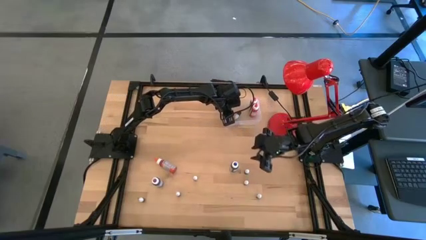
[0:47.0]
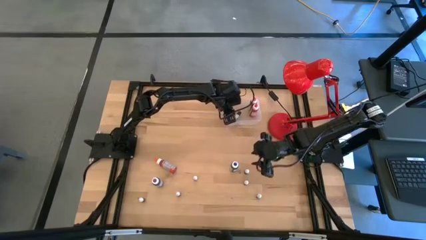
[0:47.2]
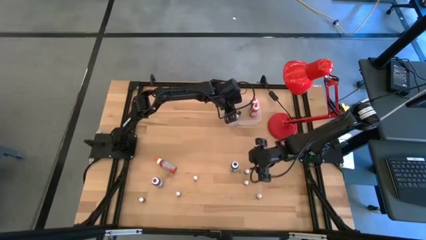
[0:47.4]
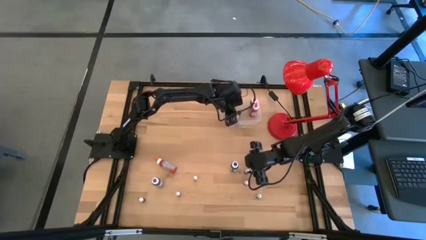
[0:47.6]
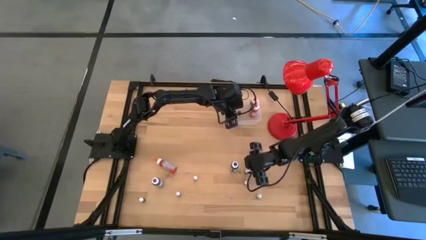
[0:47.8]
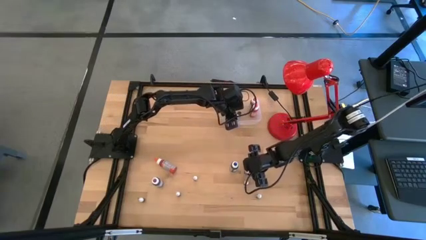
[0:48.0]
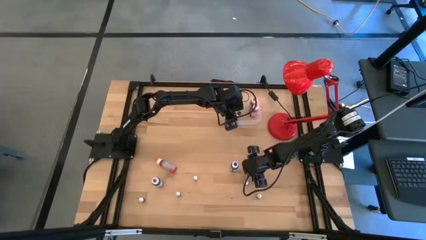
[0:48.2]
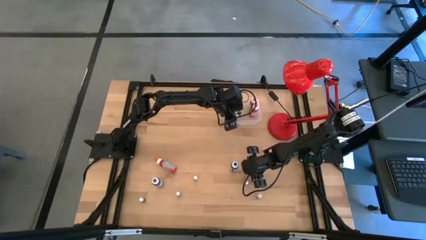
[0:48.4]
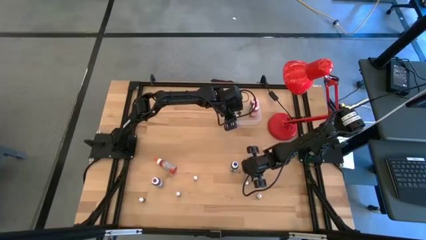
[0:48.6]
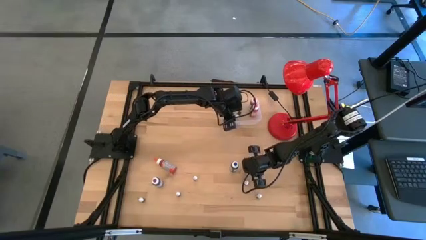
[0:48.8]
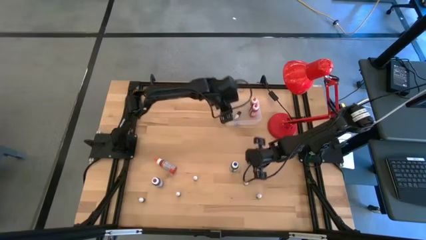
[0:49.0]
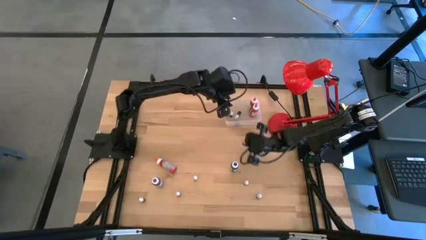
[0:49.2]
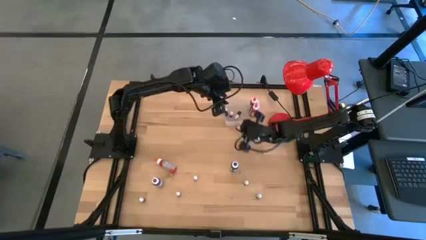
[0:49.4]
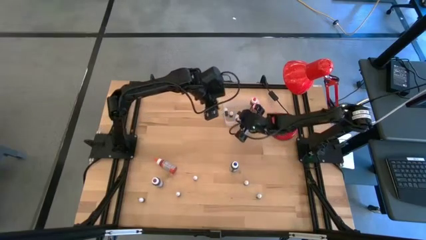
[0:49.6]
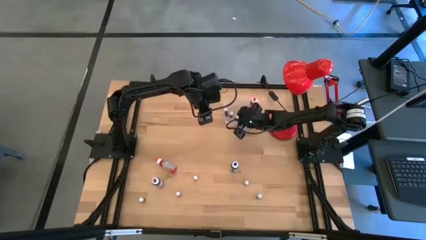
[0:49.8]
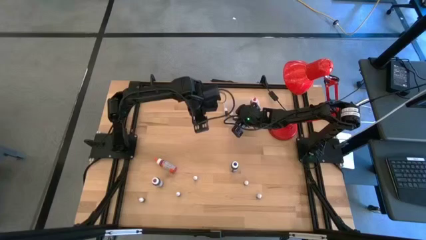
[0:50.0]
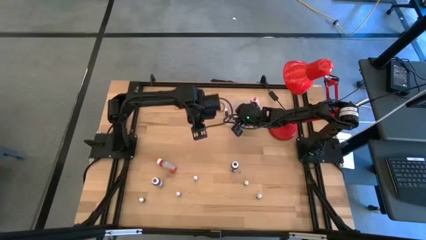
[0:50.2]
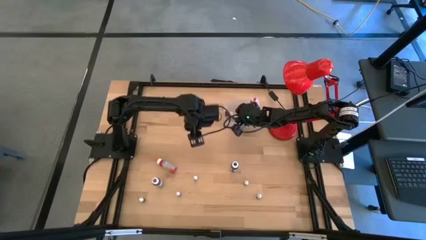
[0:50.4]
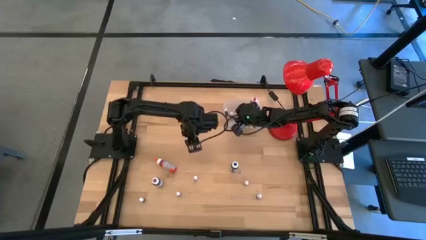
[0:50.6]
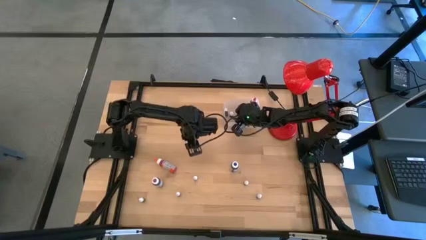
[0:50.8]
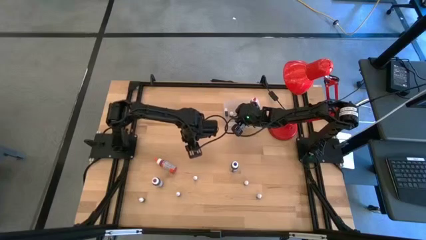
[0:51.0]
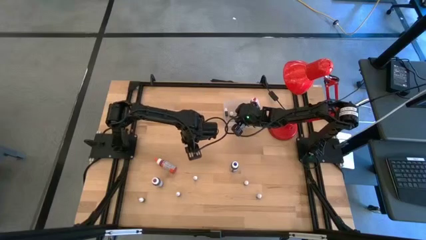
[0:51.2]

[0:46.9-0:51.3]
Task: Pick & Place food coloring
Put the small green food coloring bottle in the transparent bin

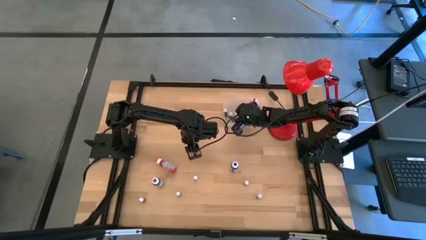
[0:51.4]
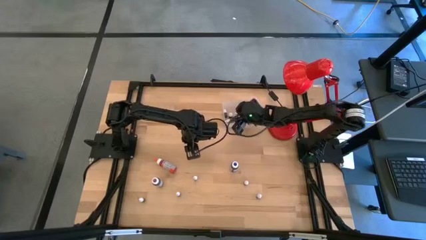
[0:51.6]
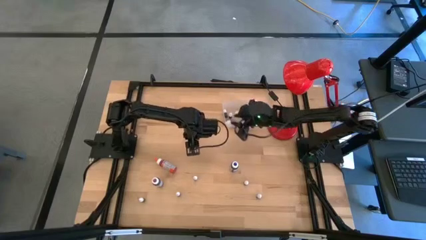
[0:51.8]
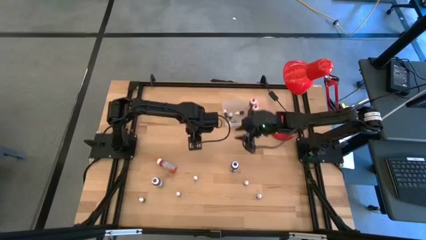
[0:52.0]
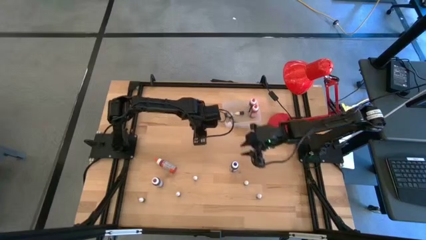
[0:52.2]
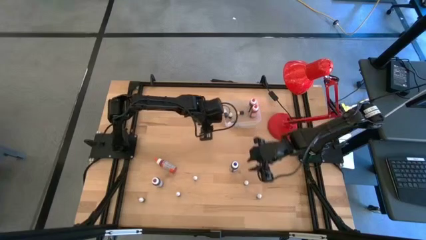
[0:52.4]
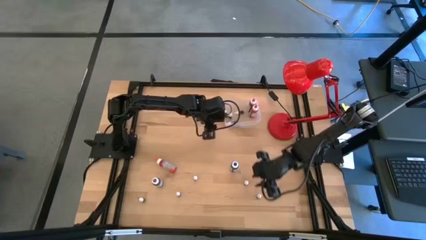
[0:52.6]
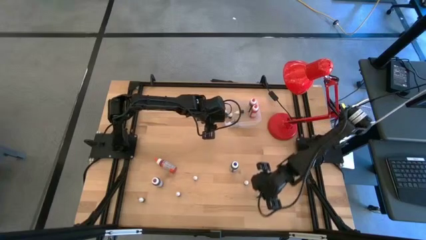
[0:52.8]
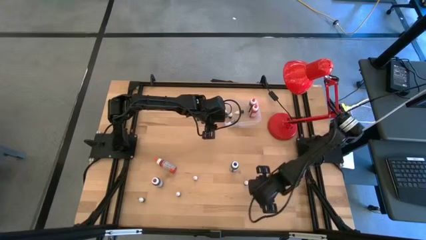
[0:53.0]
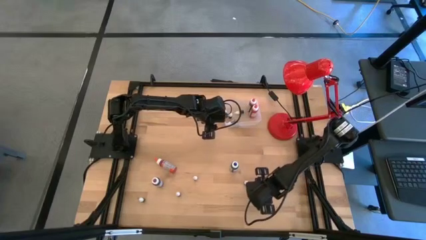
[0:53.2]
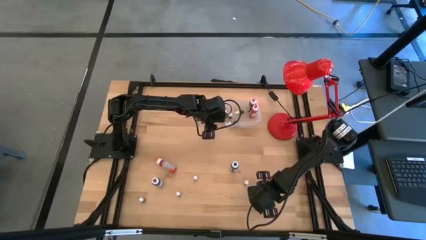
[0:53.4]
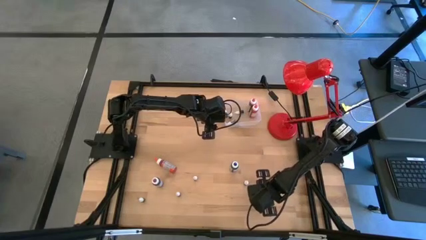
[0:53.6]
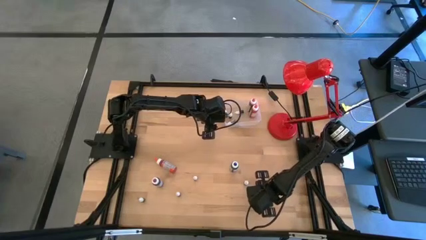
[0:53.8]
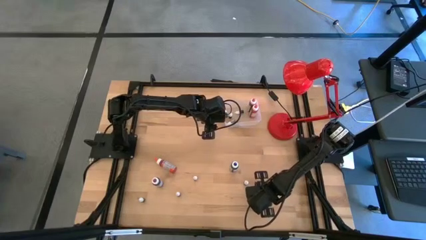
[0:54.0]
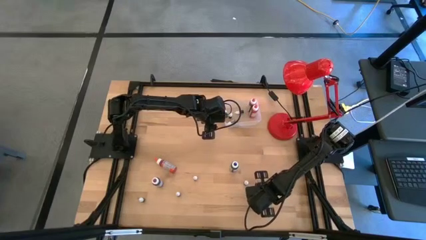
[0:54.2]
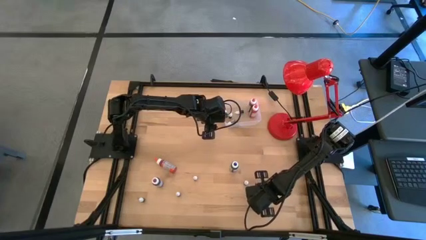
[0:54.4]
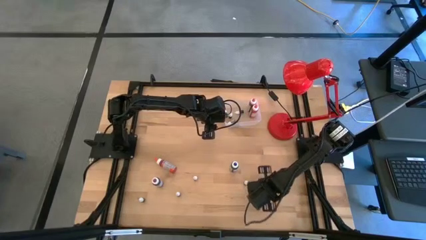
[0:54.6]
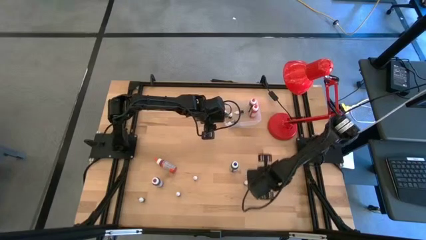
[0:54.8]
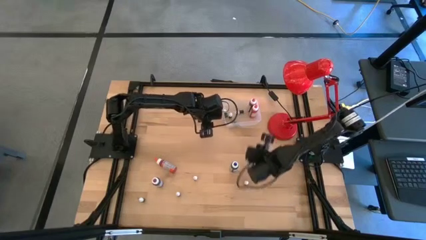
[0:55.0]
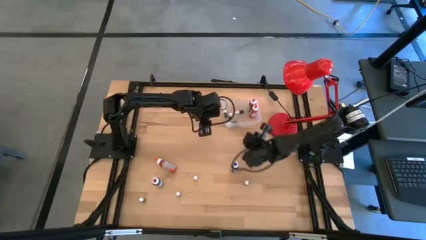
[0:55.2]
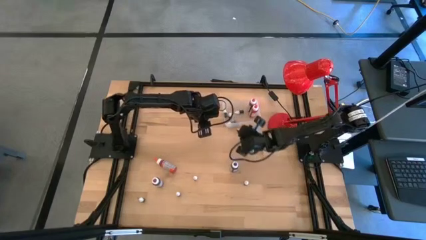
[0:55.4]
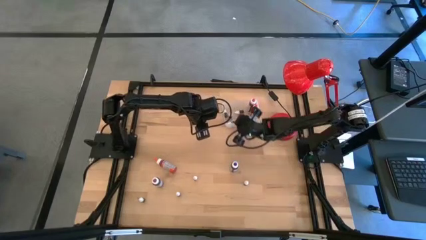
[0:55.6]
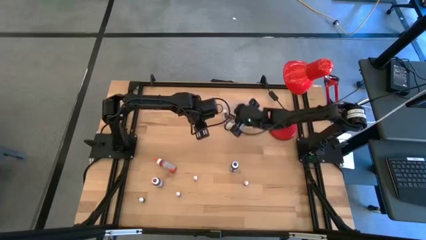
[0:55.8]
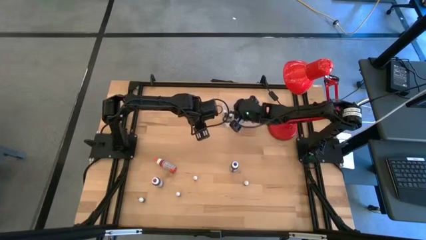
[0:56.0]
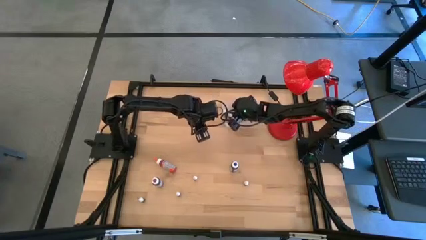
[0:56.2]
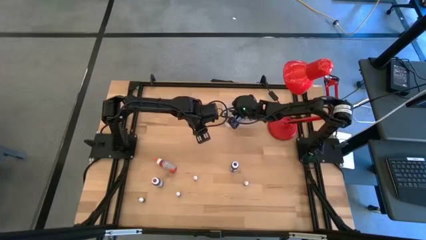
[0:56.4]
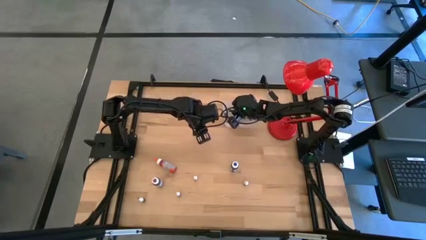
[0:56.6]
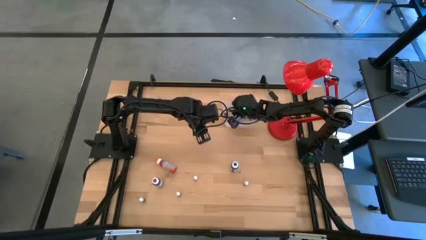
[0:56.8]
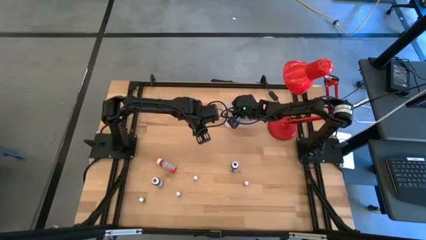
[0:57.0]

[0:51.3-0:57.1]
Put the small blue food coloring bottle in the transparent bin

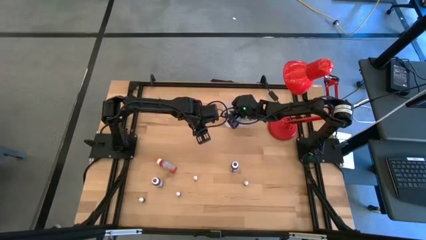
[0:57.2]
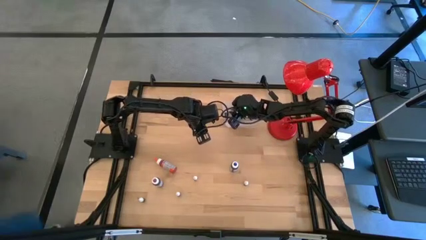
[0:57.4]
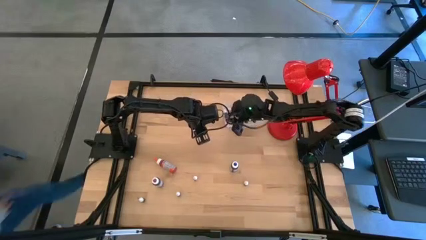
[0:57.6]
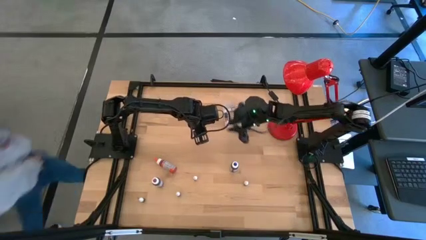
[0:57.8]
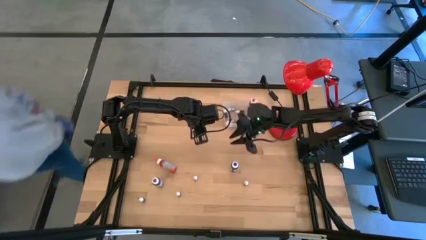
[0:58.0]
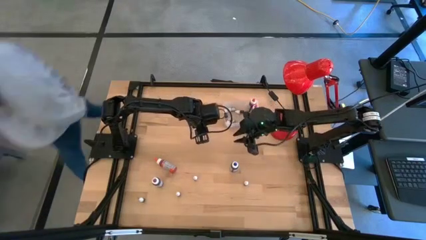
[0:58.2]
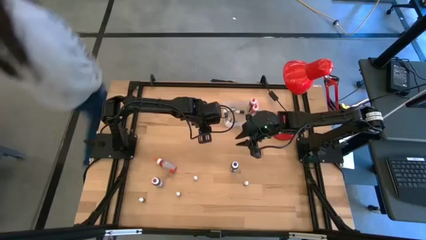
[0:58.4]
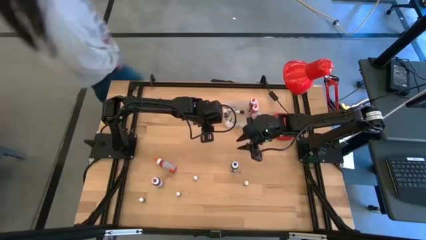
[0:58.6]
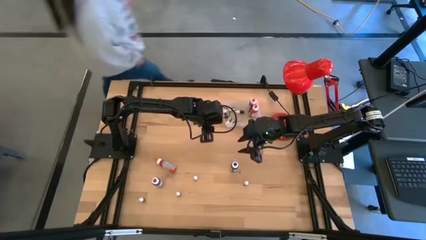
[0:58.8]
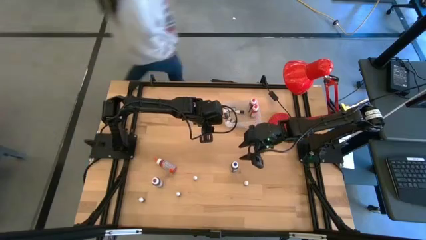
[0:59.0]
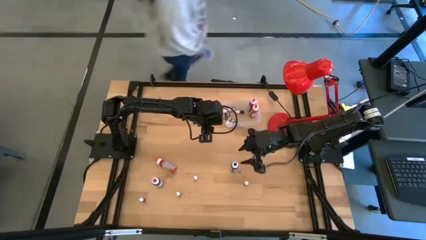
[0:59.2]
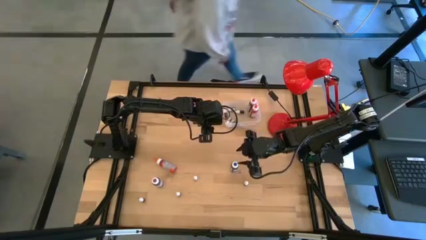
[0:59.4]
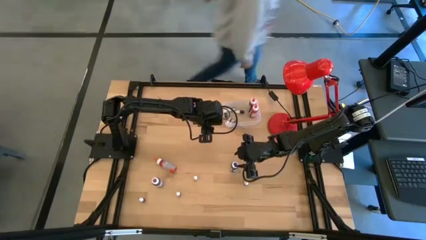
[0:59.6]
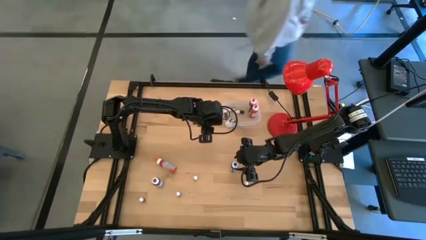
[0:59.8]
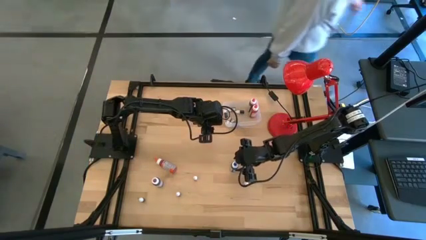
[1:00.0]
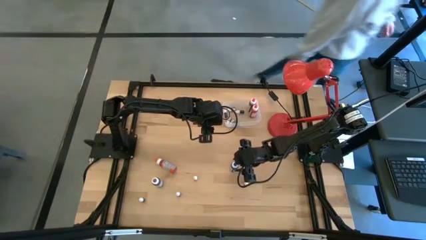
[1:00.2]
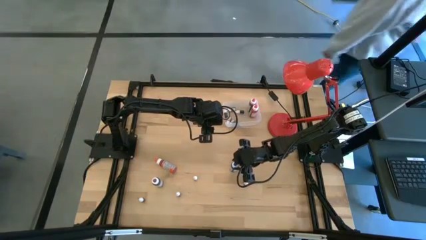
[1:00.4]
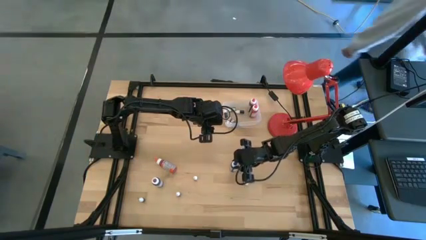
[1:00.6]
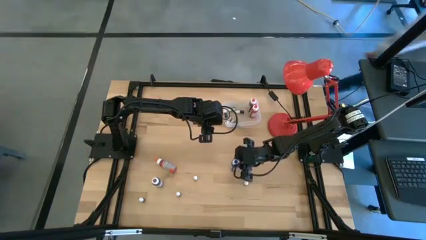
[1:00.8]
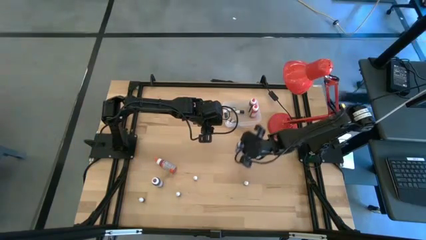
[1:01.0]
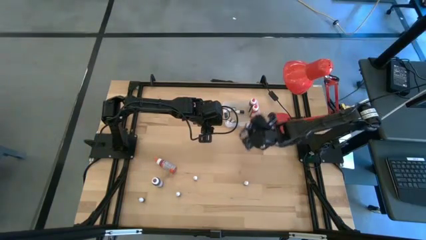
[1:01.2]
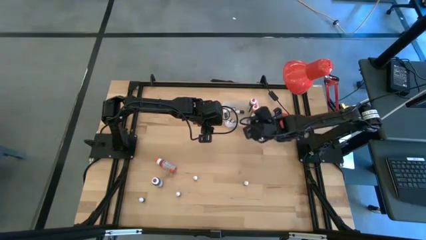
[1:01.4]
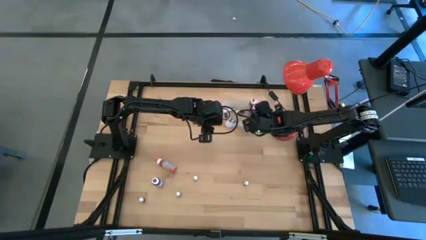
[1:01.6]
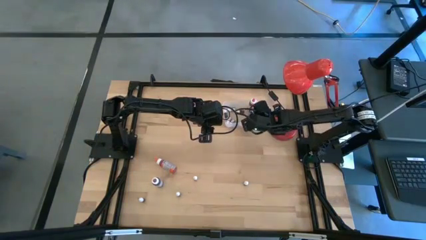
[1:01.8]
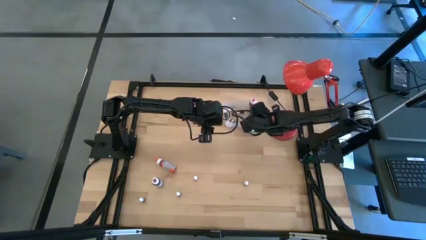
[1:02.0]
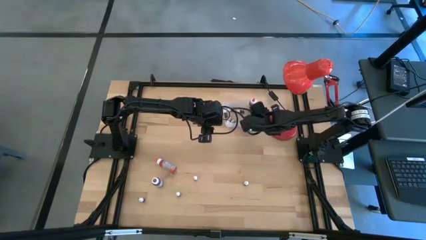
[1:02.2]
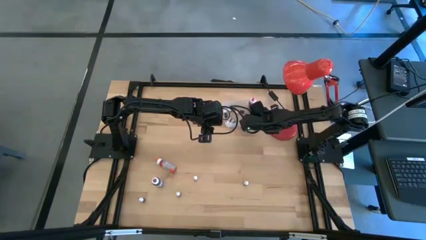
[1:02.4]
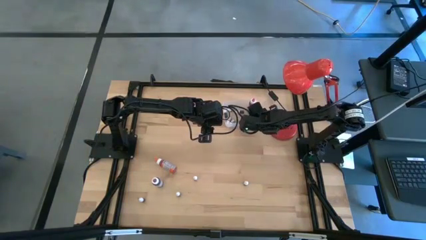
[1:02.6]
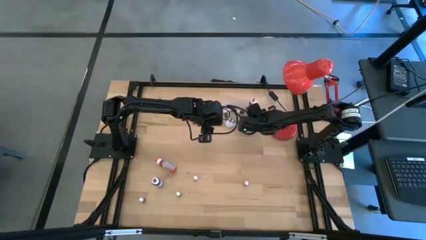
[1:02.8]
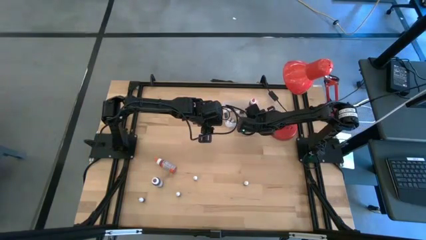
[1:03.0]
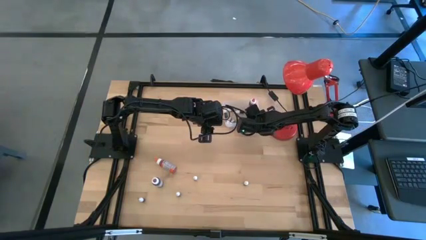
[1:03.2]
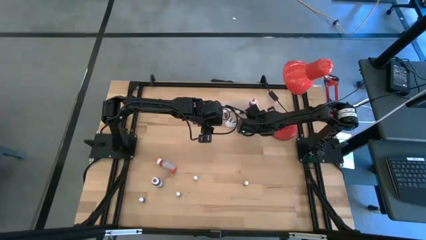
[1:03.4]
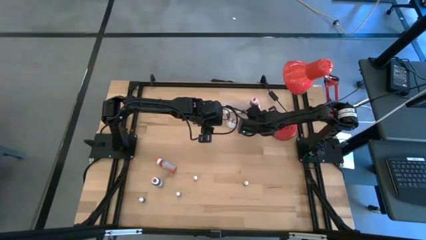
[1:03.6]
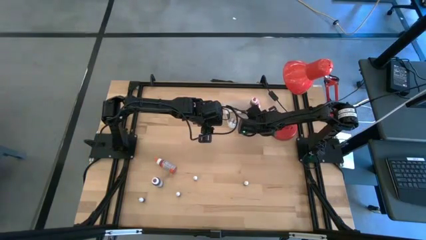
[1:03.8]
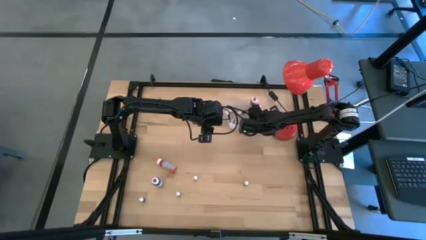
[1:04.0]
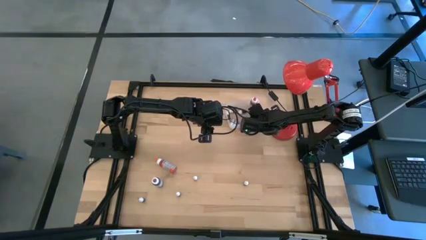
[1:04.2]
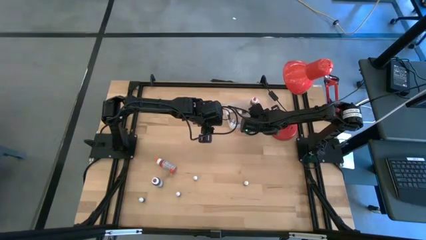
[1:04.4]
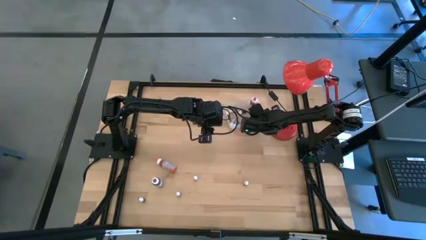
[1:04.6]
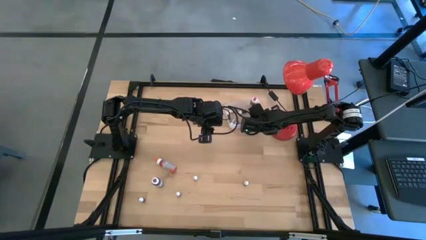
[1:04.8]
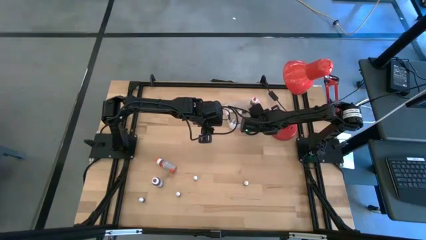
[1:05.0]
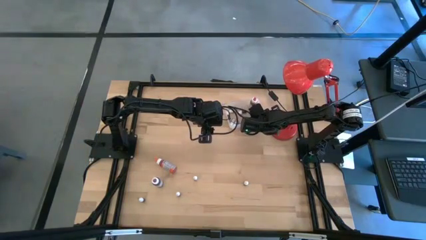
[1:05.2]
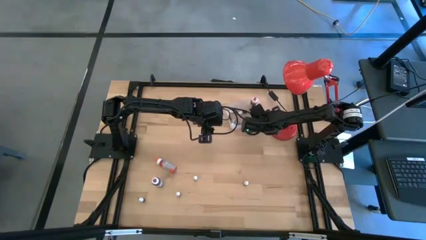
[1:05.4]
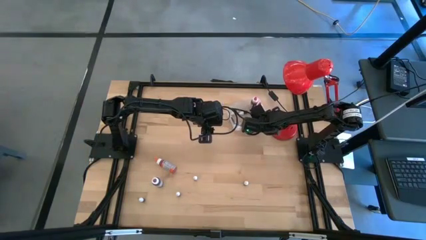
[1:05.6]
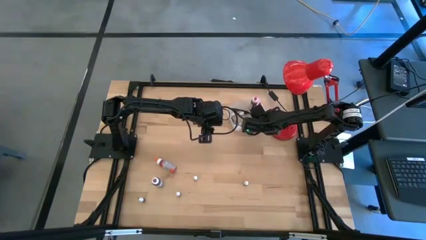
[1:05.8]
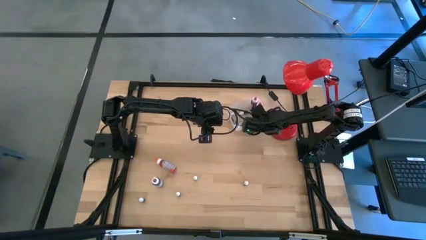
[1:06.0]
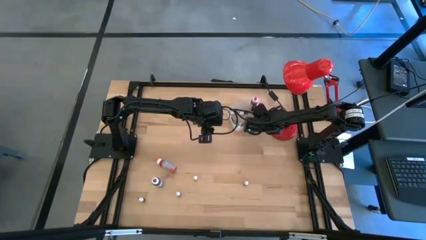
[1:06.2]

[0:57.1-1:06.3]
Put the big blue food coloring bottle in the transparent bin
